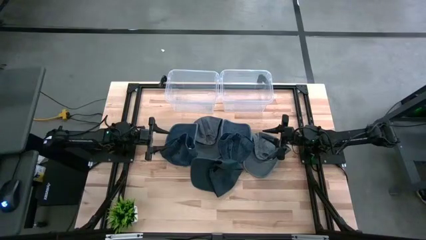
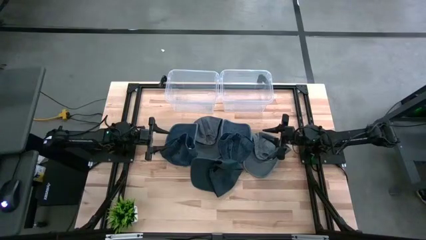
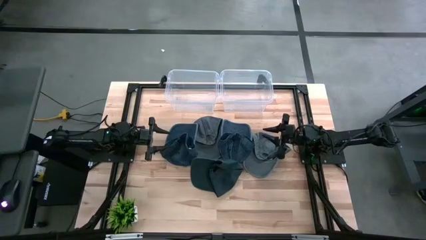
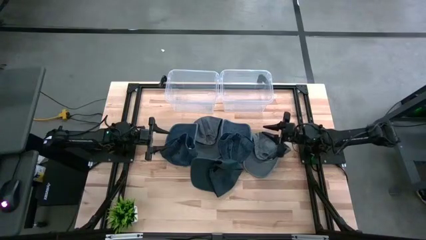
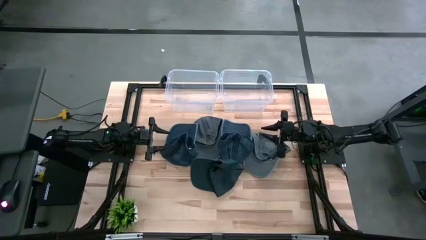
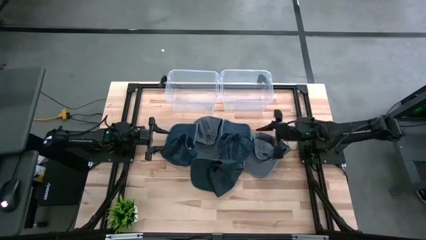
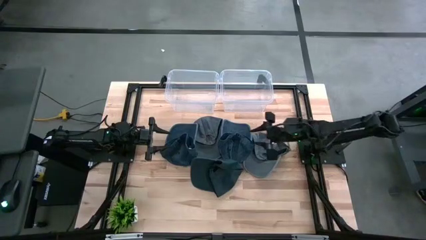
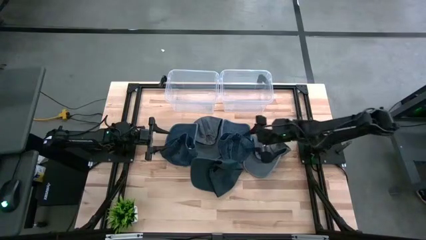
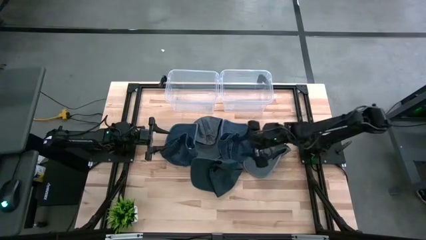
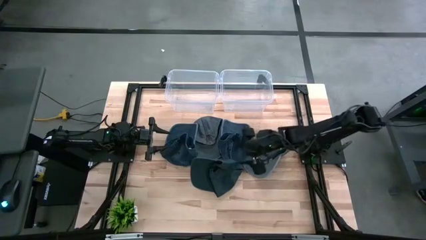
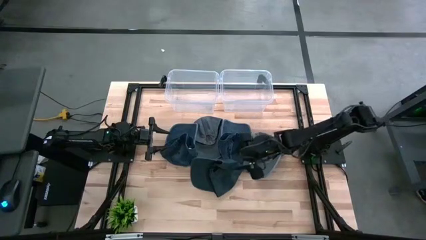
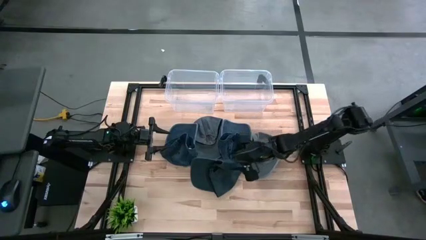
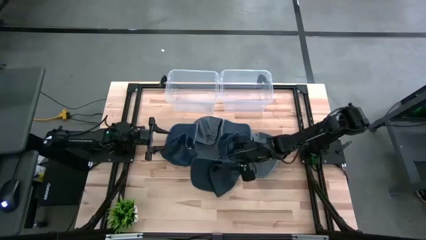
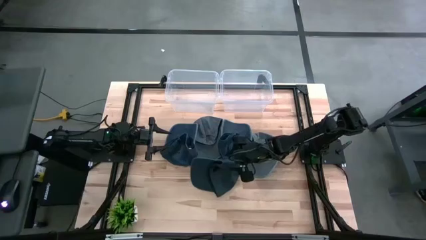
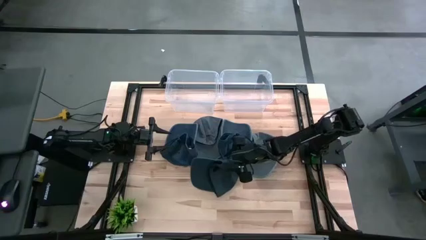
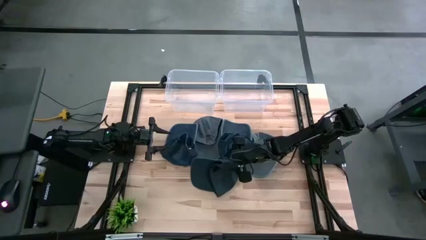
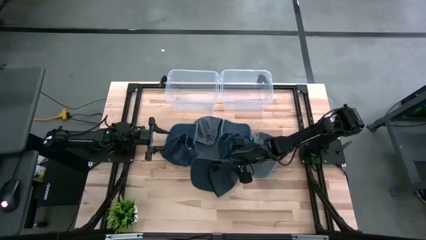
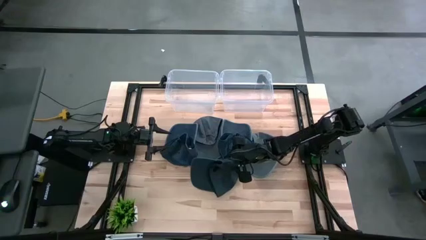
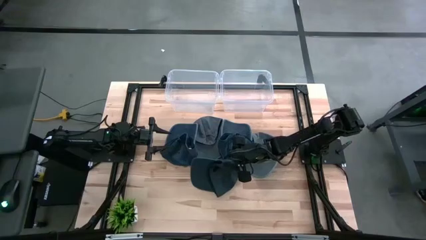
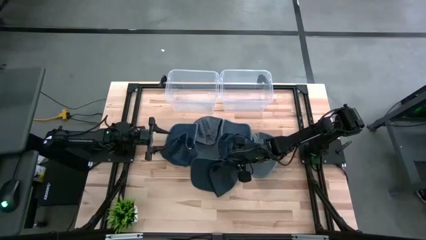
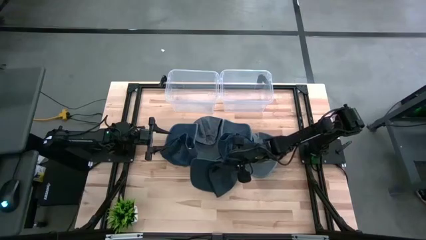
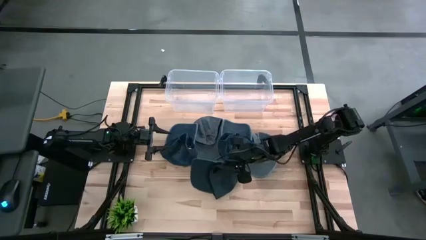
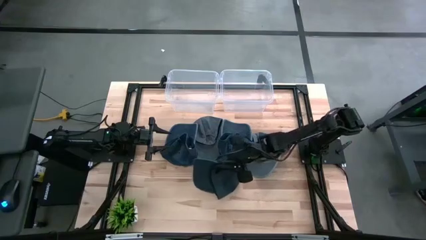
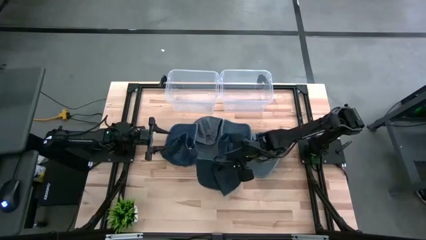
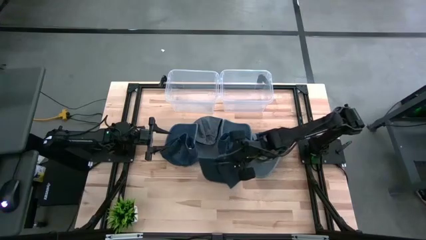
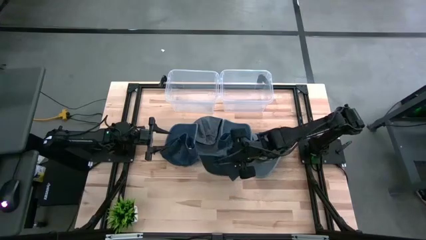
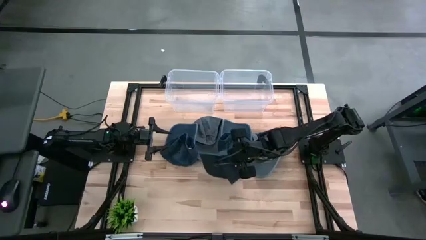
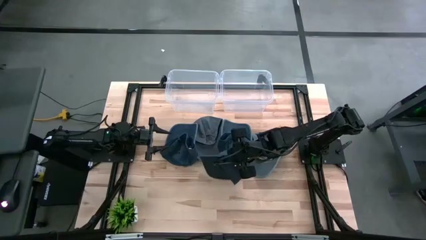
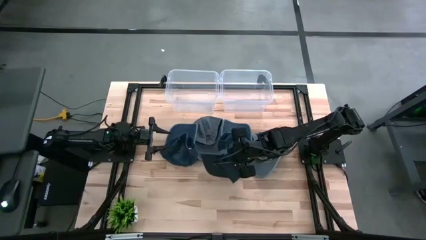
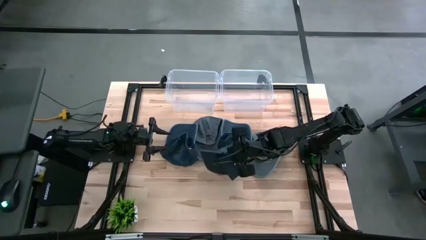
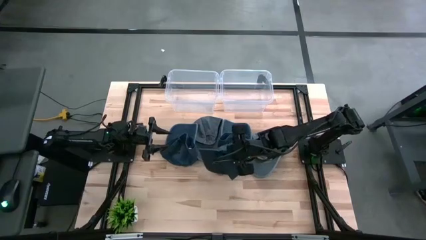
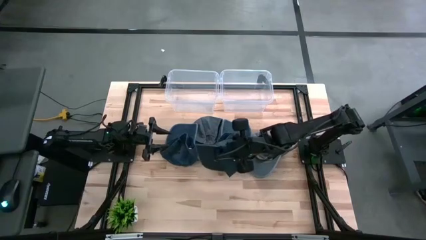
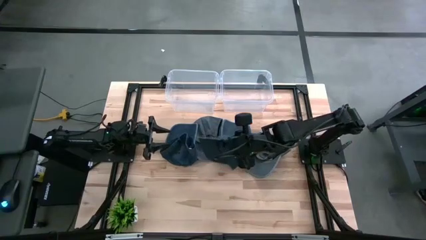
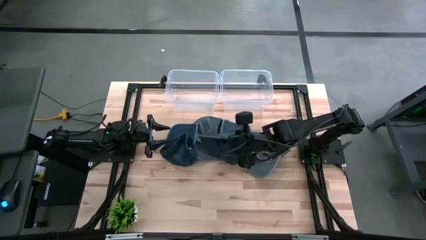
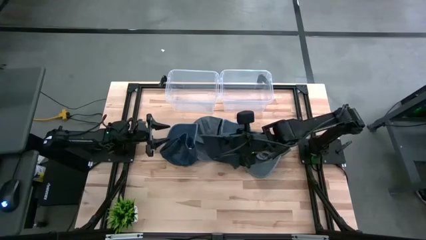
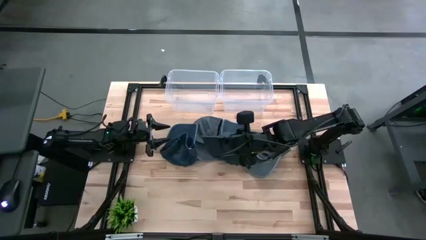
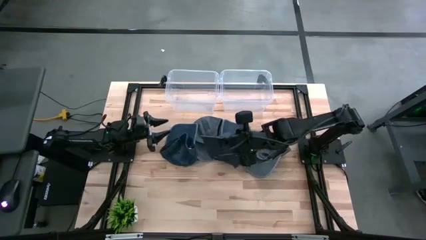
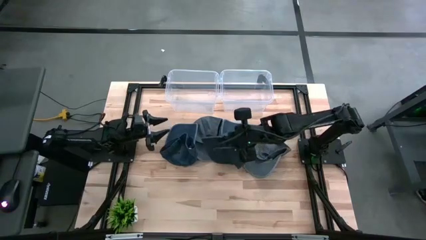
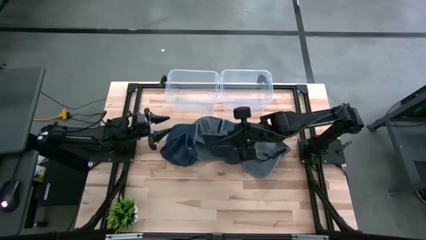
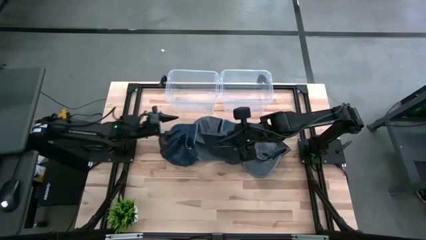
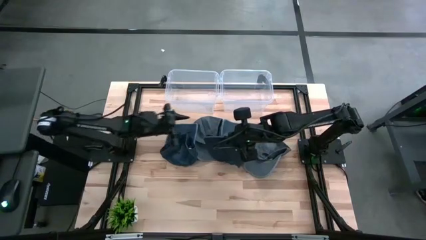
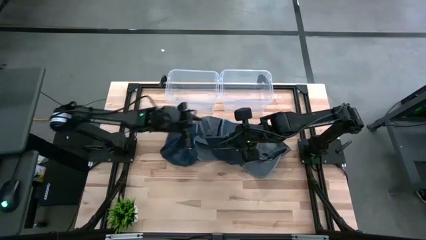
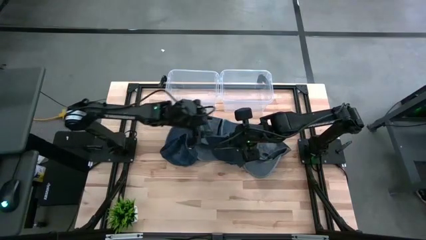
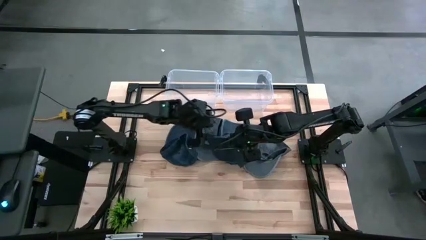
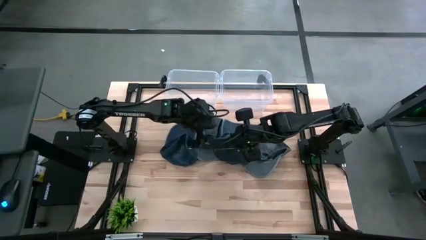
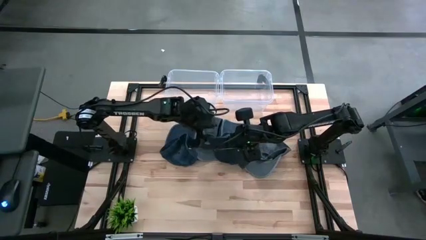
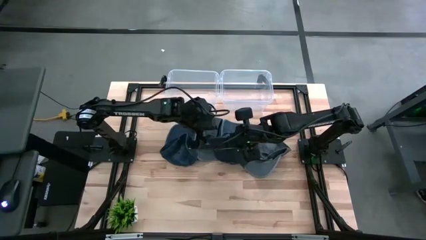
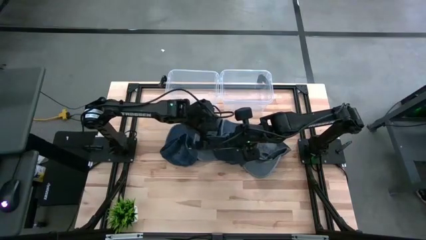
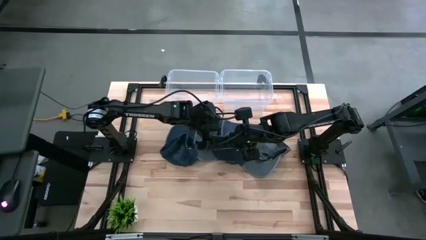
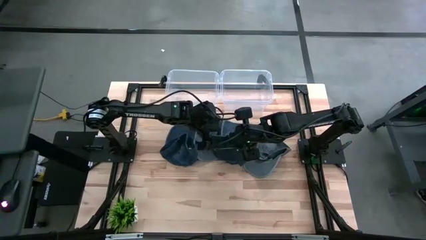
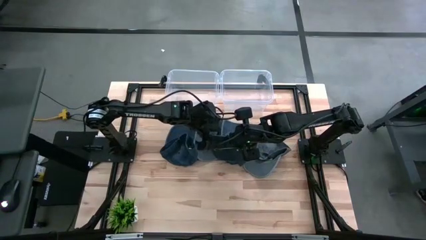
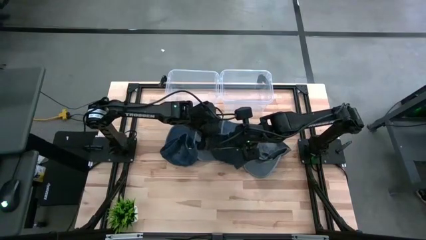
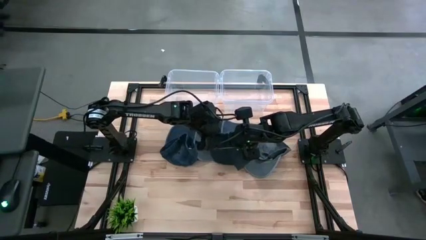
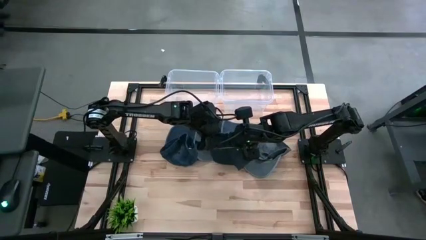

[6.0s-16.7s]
Task: Pick & Place hat
Put the bottom blue cap into the right transparent bin

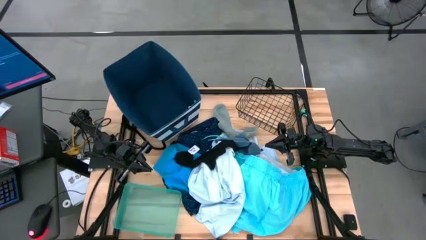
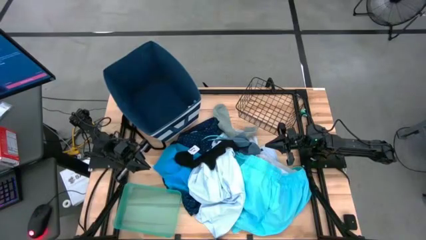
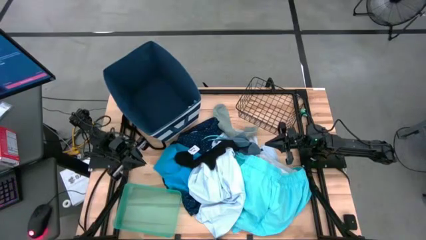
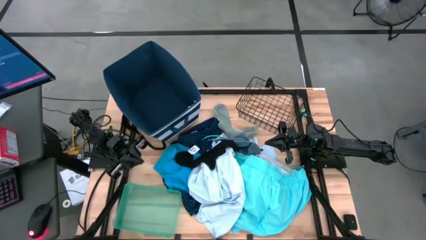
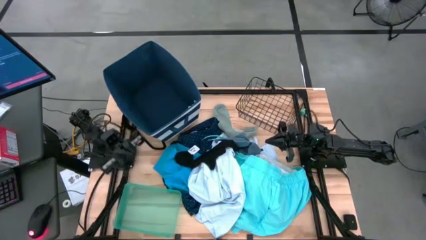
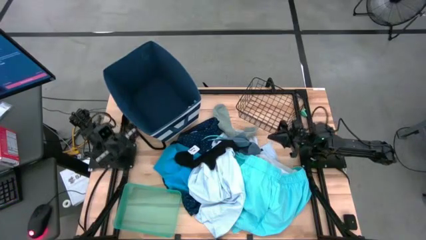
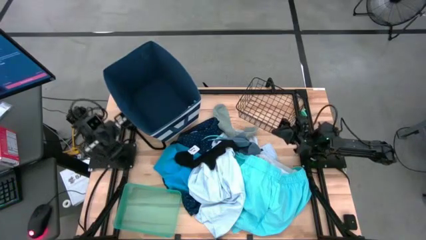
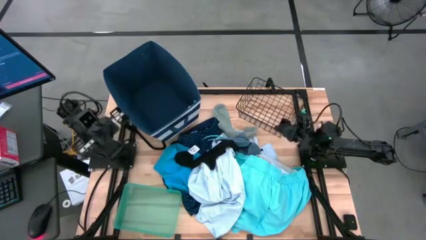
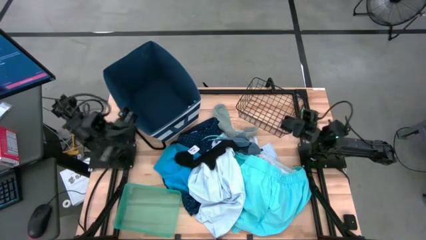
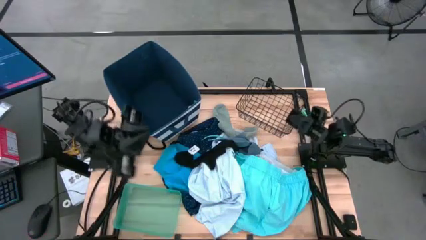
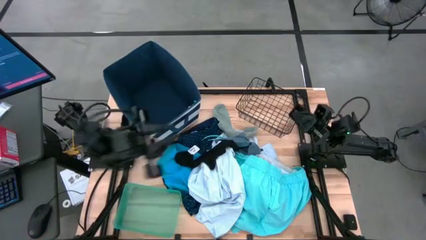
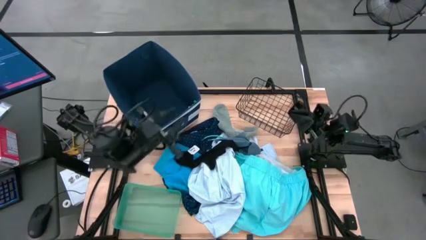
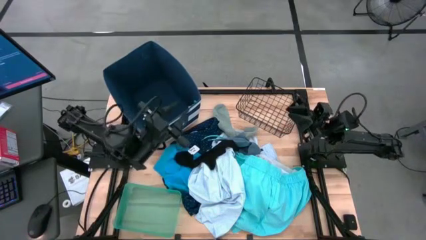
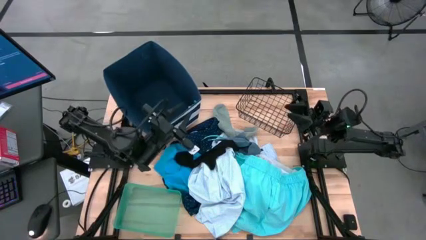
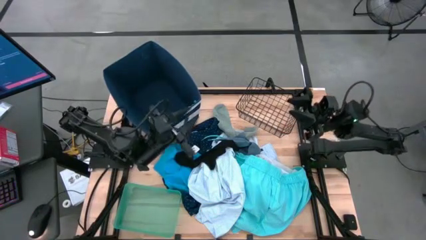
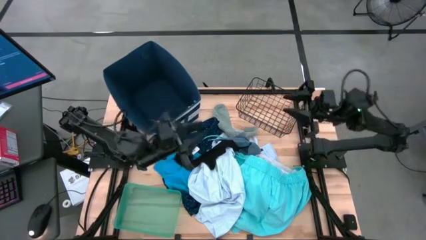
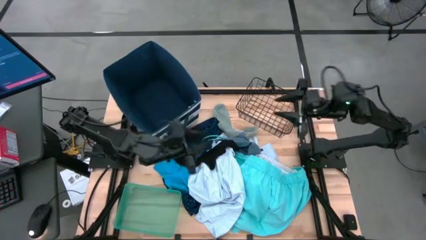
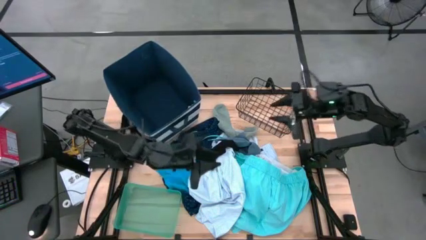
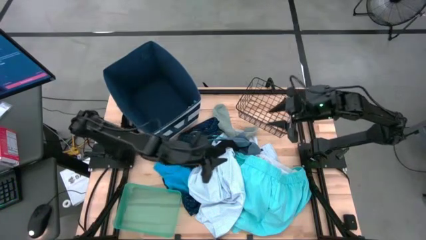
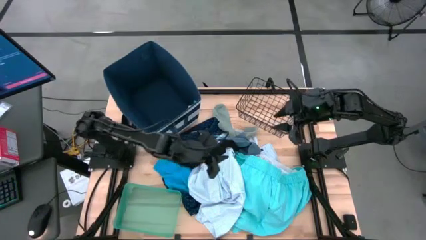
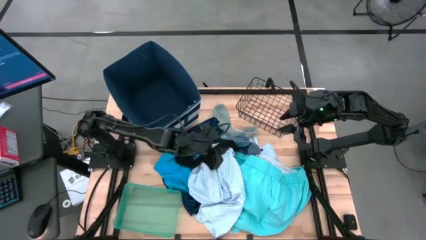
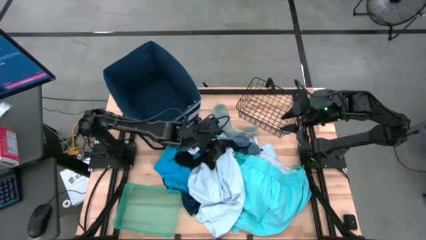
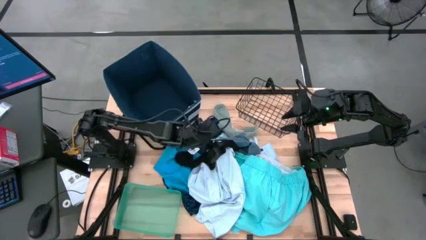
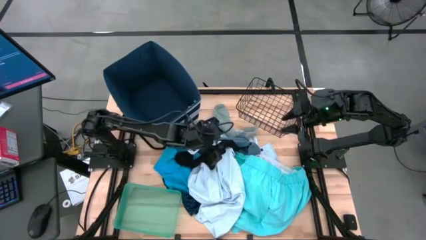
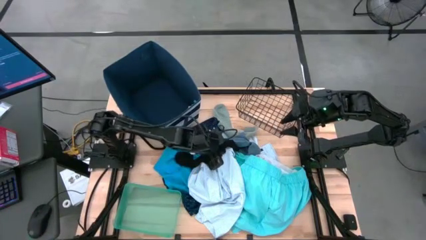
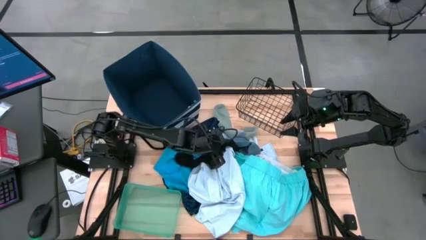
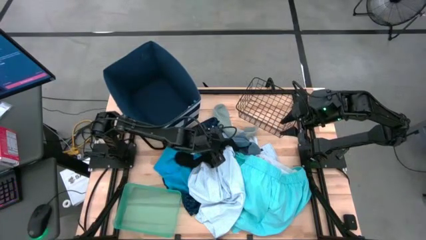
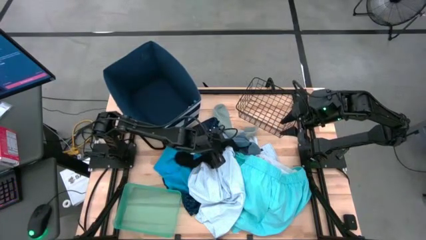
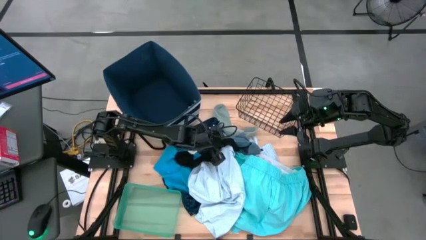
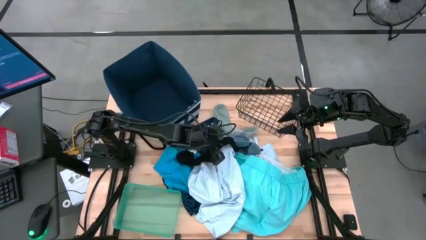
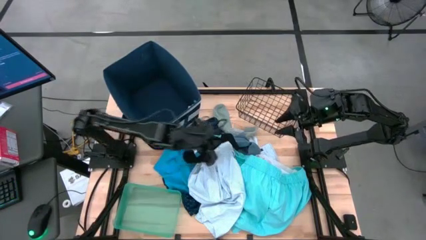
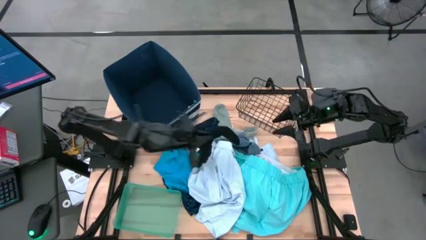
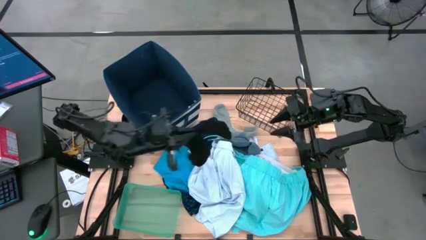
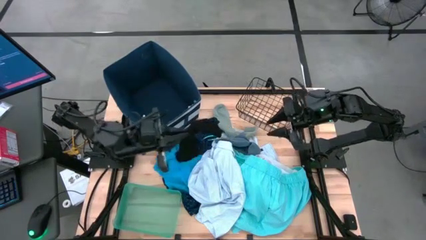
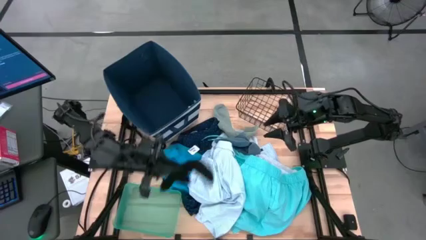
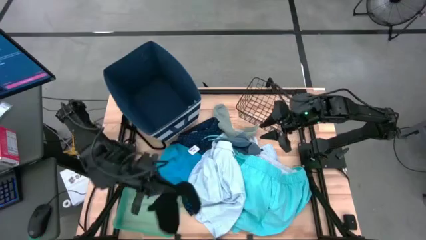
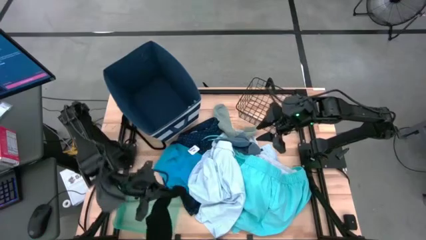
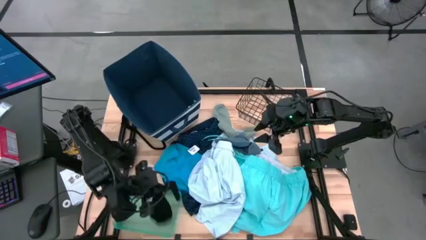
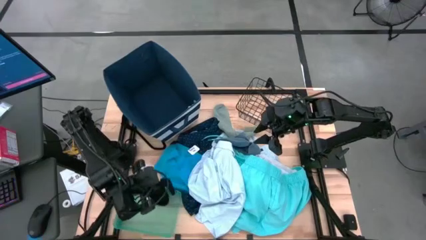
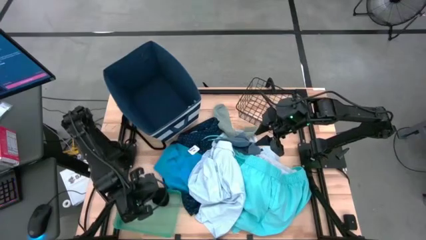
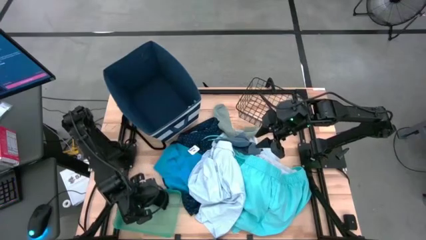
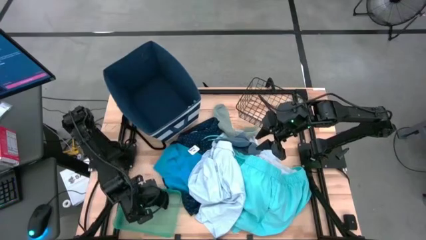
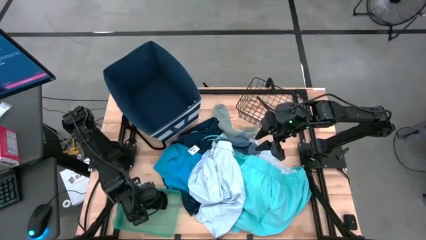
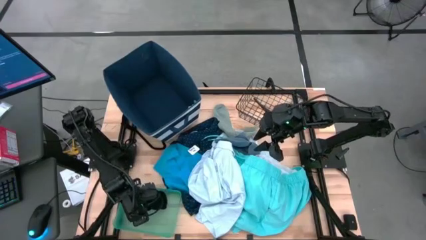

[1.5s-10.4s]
Task: Pick & Place Cloths
Put the black sock into the blue bin
